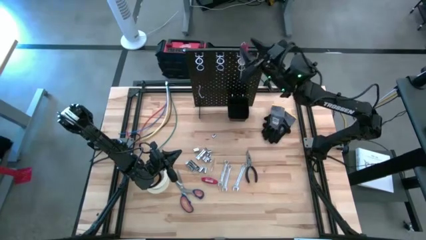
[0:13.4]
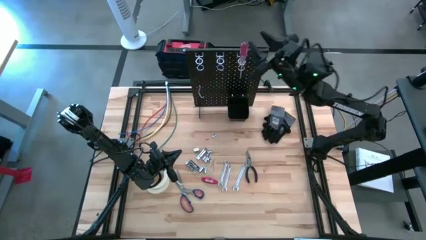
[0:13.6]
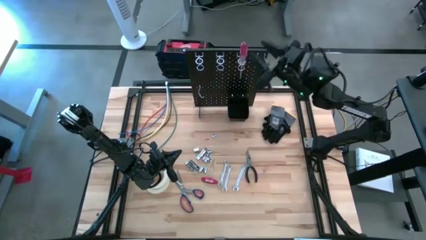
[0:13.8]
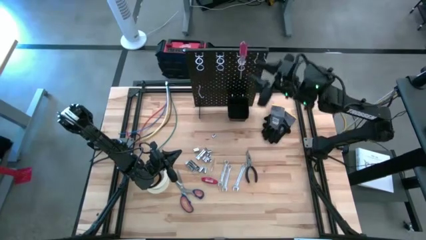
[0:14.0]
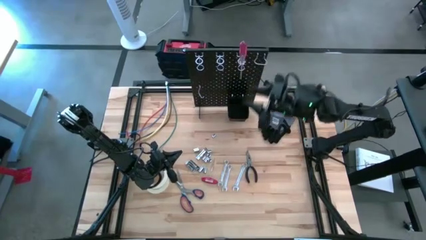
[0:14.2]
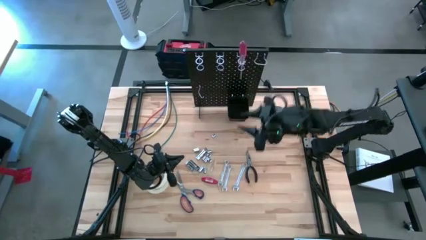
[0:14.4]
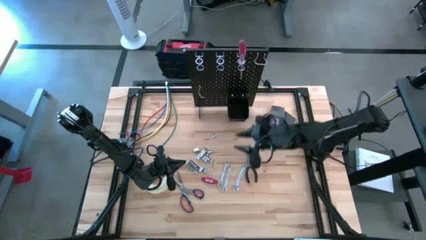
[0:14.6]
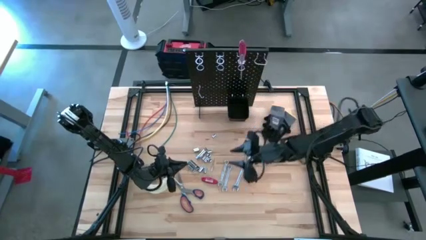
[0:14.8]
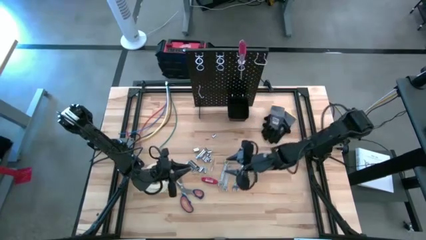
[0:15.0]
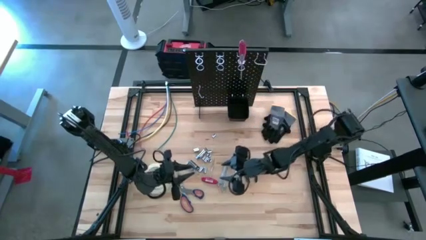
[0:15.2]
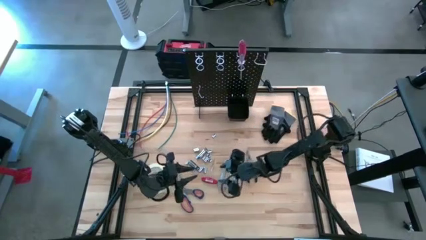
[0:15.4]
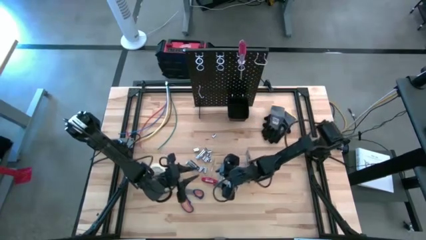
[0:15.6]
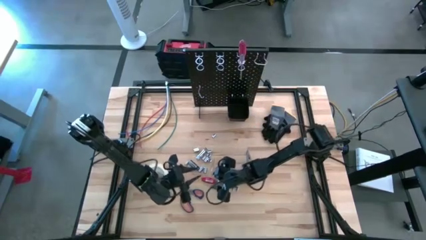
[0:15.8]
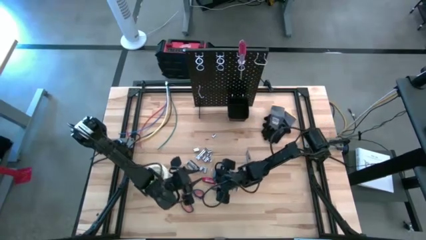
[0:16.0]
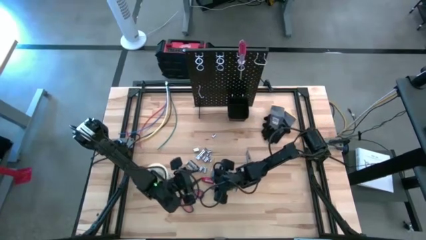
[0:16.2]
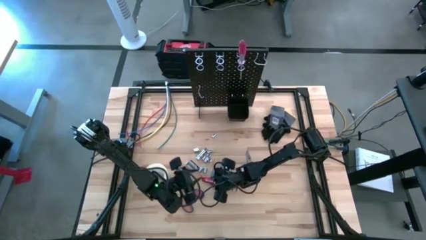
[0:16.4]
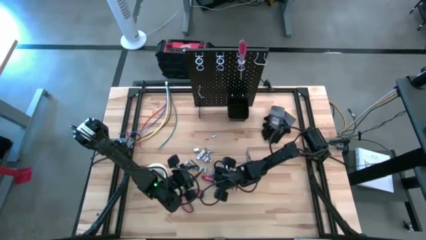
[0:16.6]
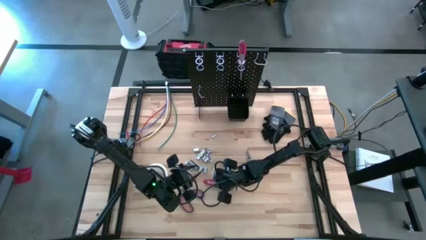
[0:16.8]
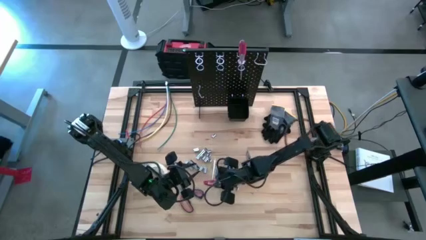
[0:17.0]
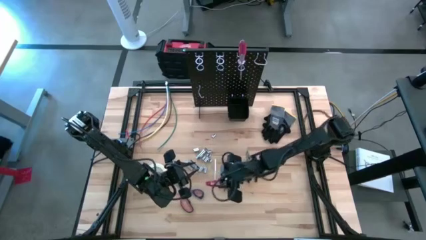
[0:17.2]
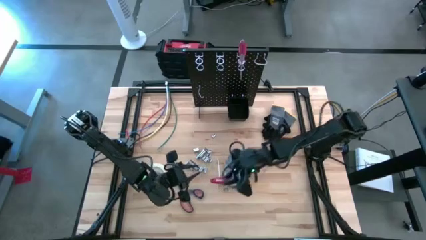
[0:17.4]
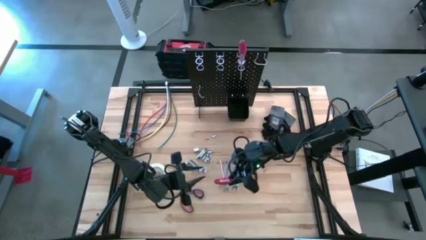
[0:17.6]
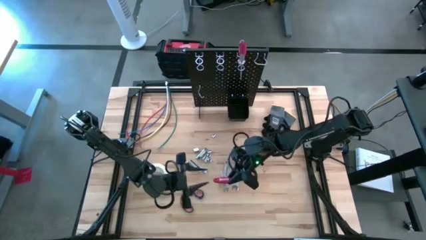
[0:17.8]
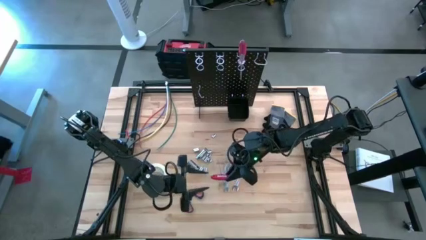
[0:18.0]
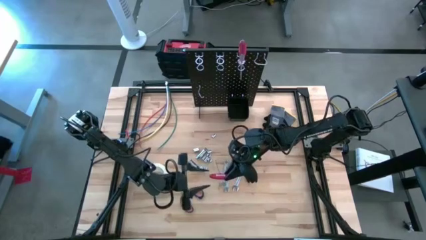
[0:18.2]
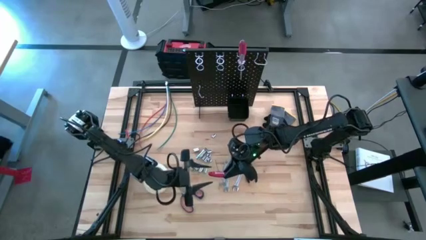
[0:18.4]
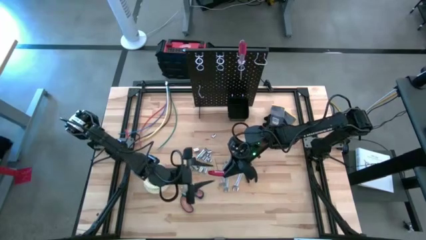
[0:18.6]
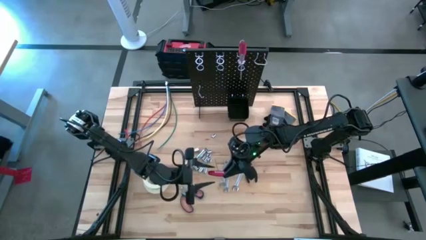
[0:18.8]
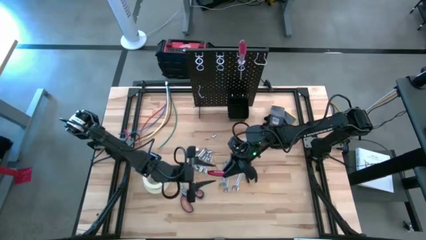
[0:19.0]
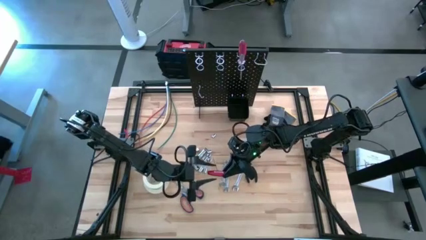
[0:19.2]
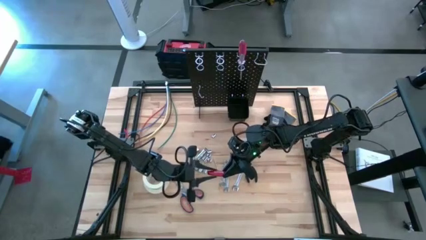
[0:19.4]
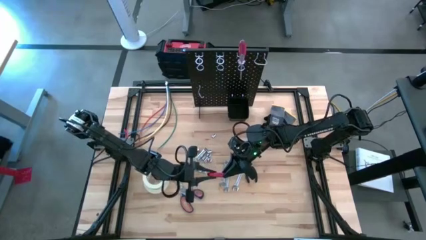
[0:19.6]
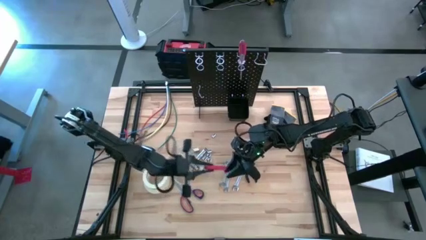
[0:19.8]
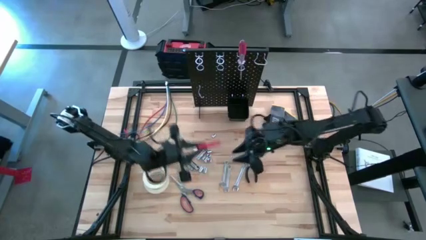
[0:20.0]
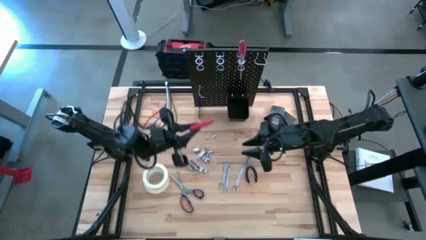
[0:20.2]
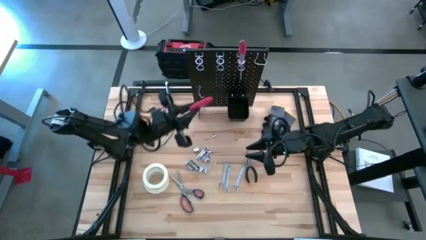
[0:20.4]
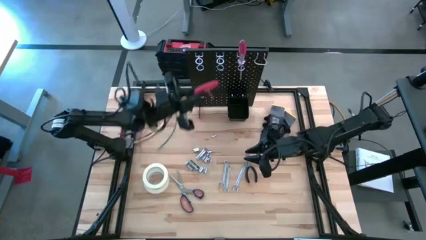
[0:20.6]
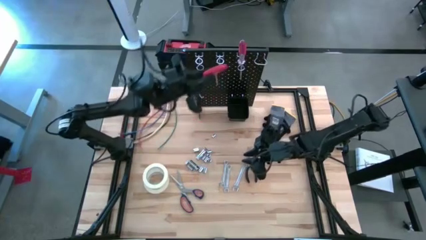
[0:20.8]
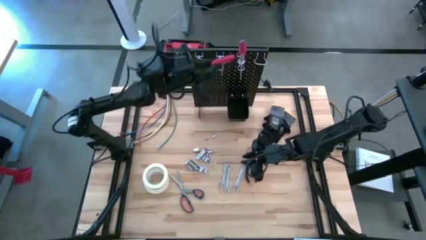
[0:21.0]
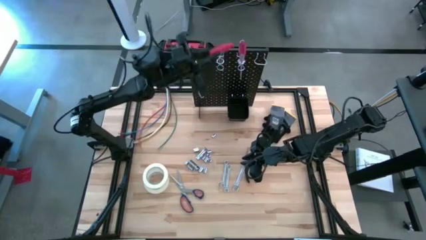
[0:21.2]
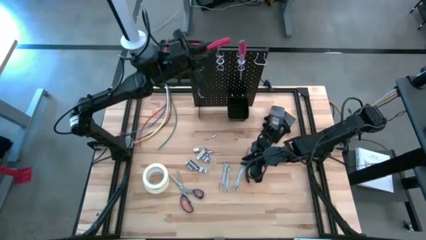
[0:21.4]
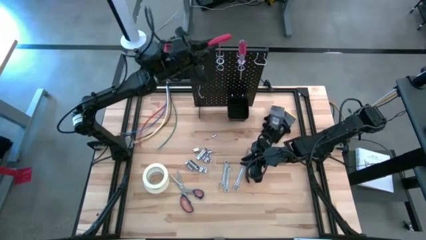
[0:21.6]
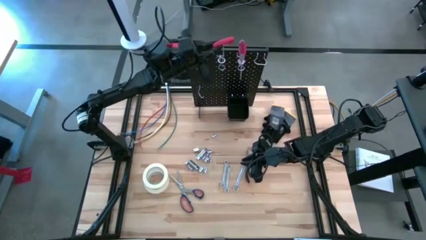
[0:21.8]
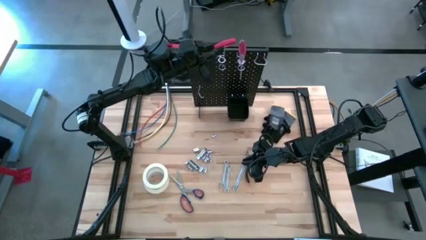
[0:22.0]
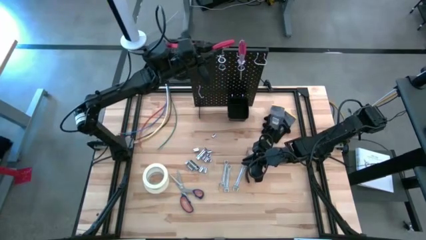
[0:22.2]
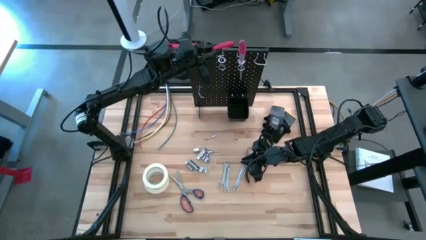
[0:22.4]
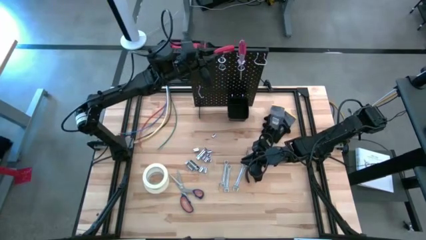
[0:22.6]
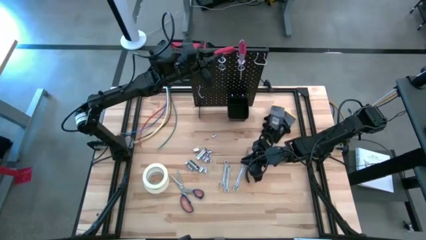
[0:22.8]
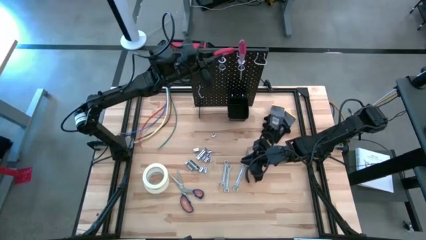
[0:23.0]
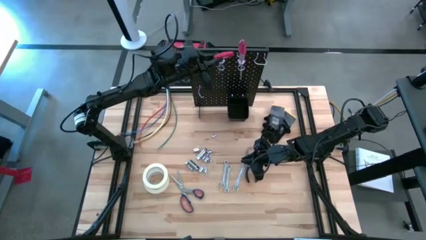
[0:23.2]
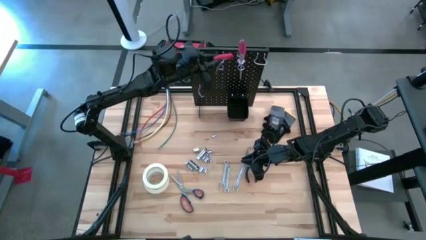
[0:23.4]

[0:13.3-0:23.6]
Task: Hang tools onto peg board
Hang the red allen wrench on the peg board

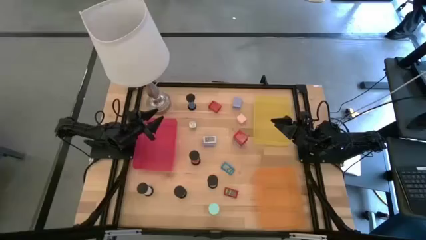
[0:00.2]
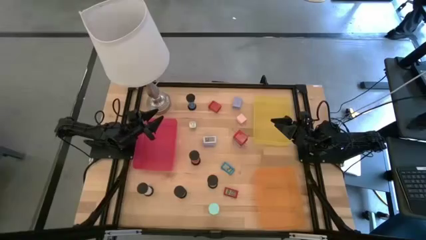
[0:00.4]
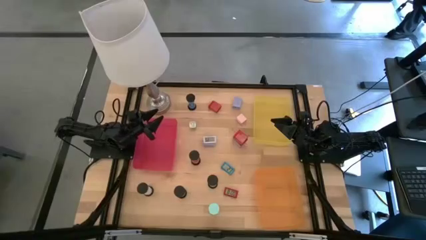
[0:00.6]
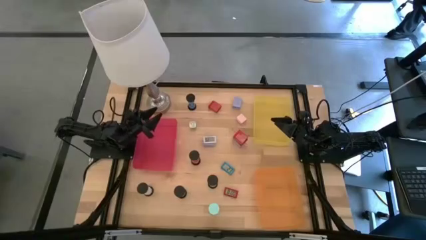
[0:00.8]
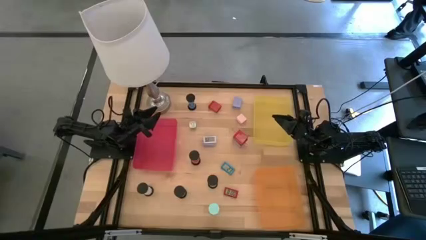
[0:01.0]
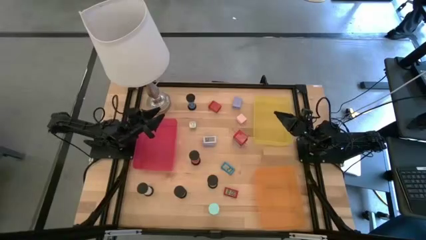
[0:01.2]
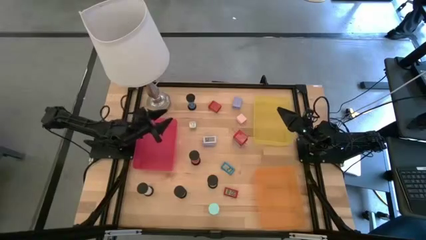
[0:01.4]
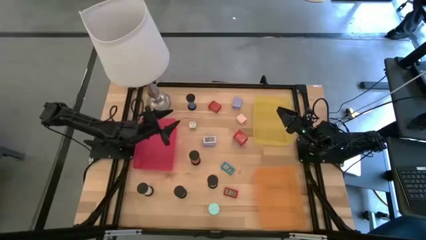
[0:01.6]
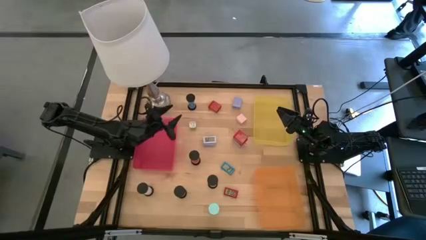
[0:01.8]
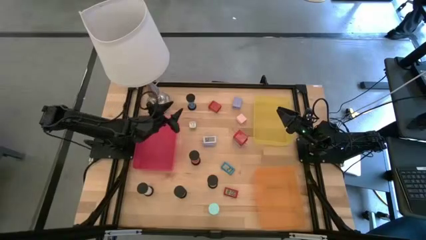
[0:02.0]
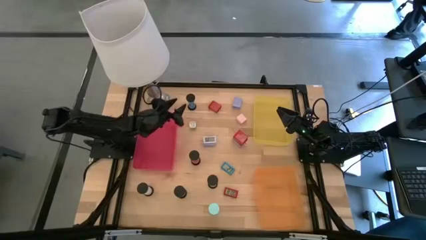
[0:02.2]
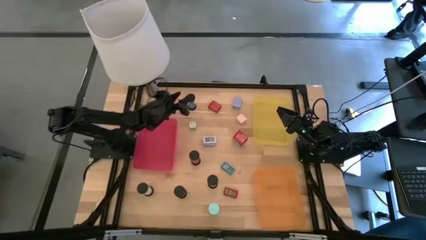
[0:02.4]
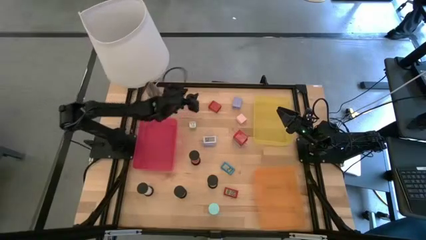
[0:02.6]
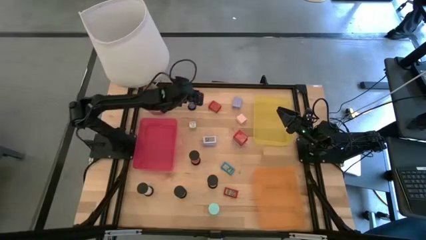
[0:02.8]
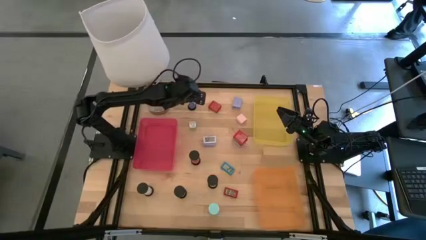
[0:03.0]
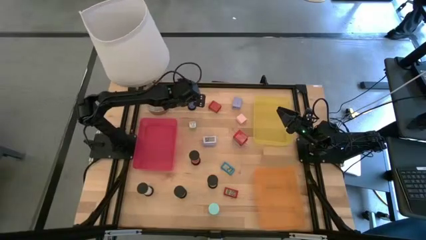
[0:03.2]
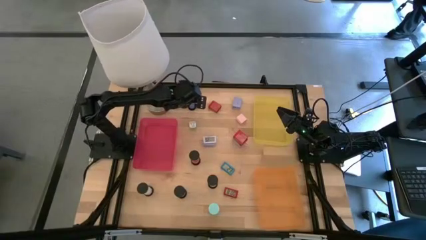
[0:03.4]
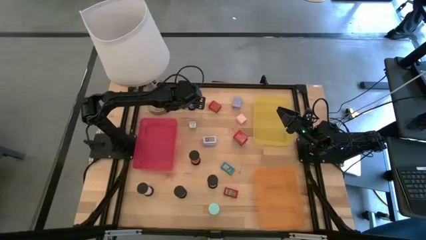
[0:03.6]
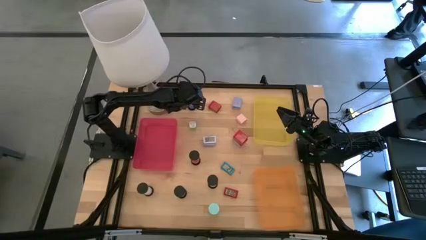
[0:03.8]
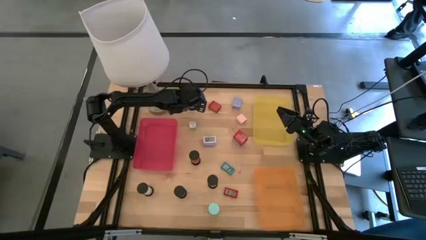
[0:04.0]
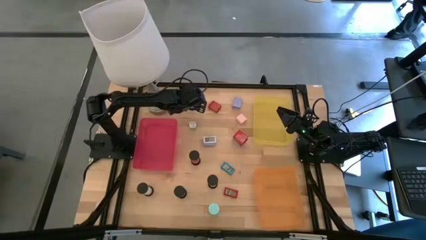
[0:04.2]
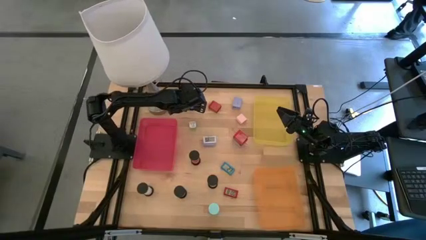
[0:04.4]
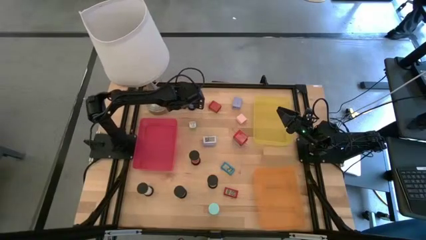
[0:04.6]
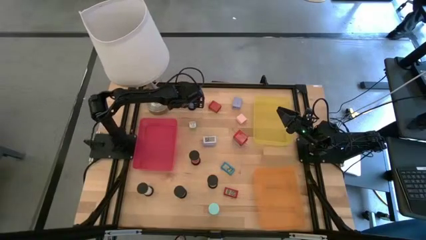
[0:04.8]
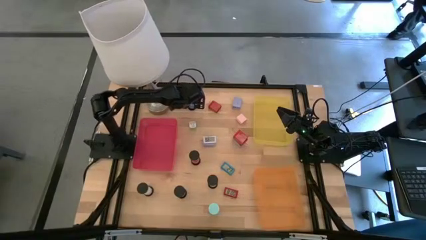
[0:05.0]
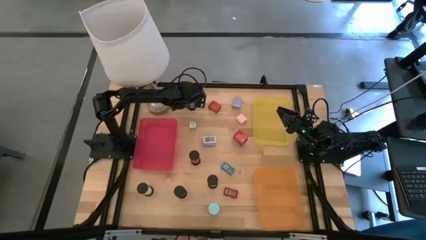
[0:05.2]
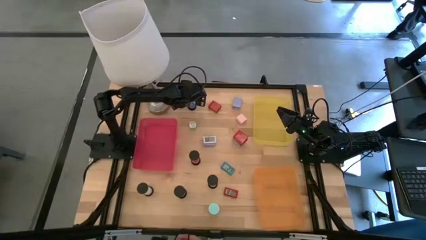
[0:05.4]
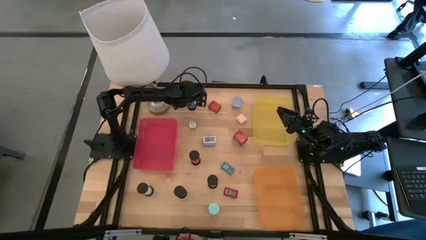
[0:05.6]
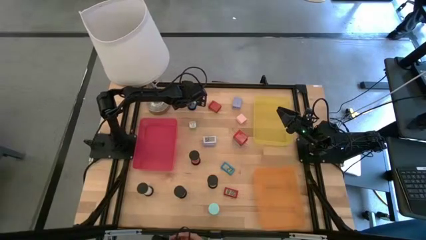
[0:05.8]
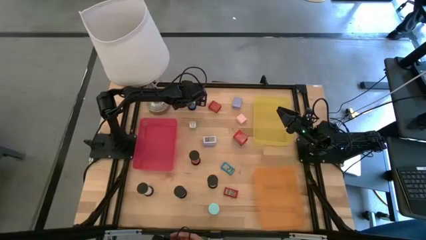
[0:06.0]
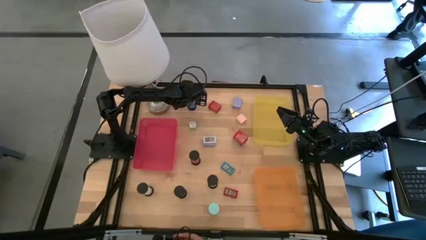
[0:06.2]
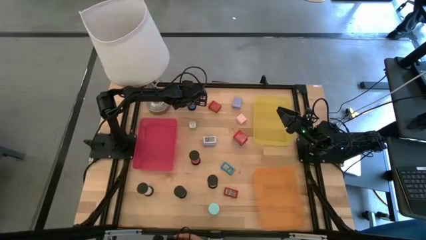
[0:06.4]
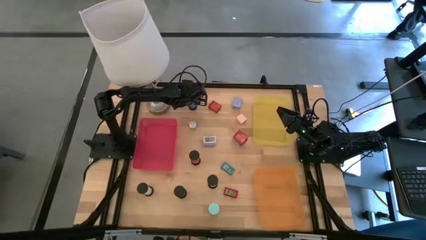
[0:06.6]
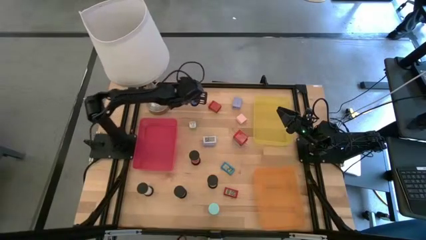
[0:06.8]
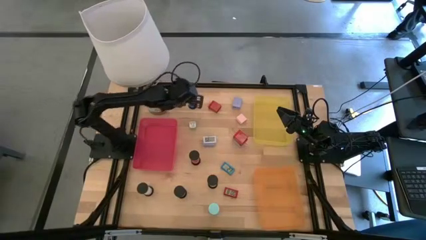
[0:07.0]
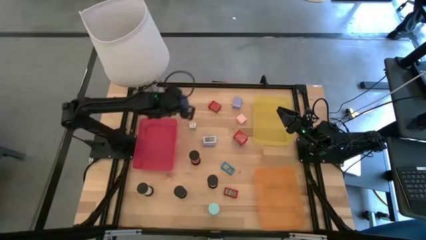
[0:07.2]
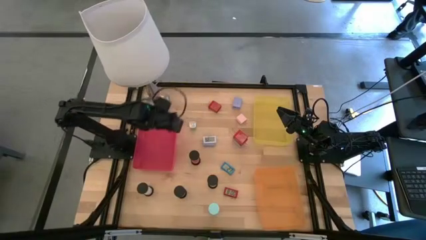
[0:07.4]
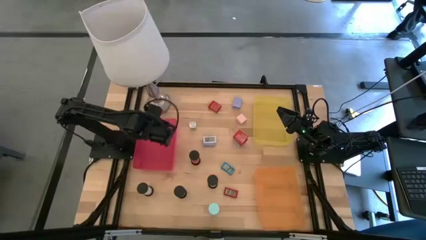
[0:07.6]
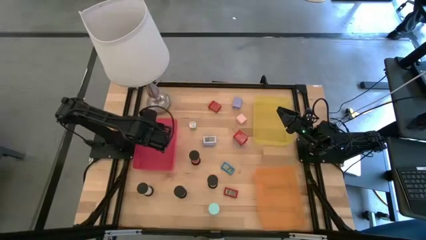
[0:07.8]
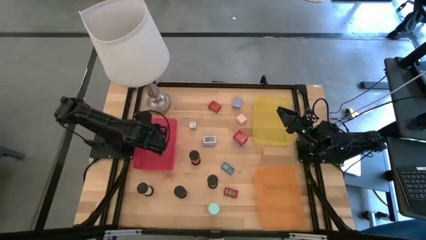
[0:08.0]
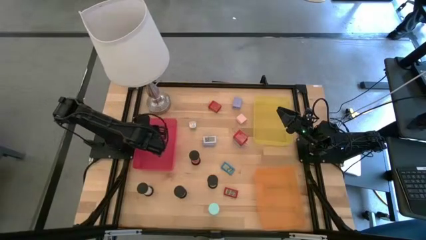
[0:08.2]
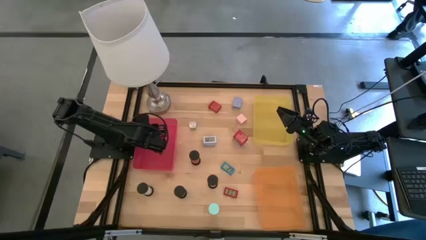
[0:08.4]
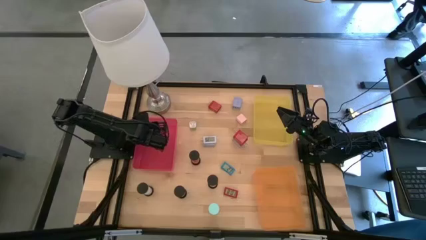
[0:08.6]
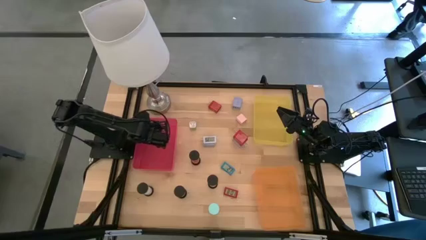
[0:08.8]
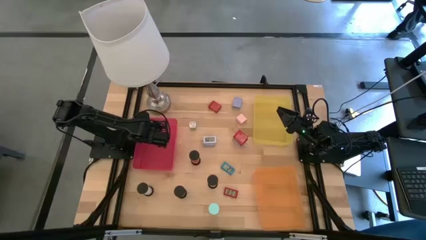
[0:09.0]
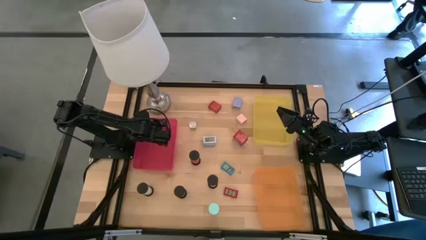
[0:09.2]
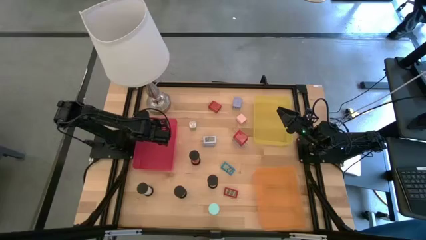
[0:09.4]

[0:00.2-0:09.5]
Task: Pick & Place Office items
Put the top blue hourglass timer into the red bin
